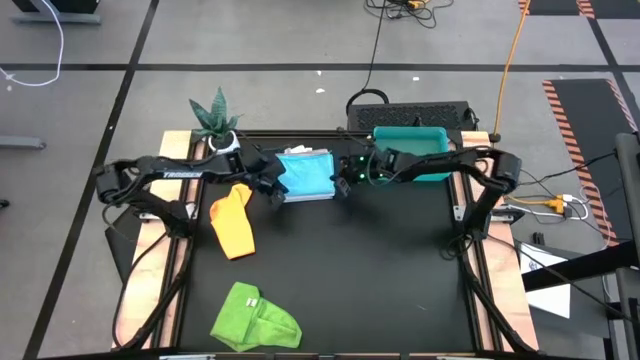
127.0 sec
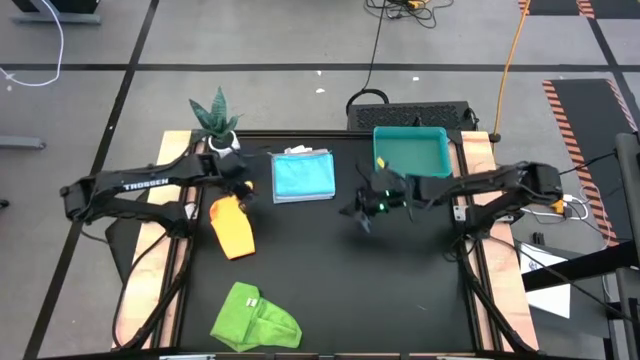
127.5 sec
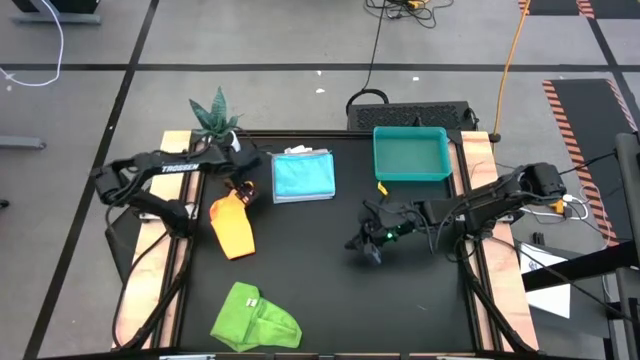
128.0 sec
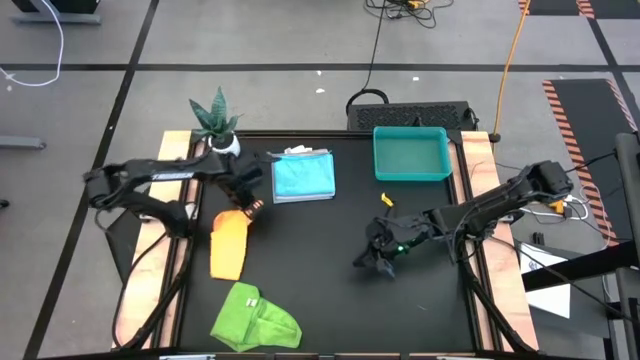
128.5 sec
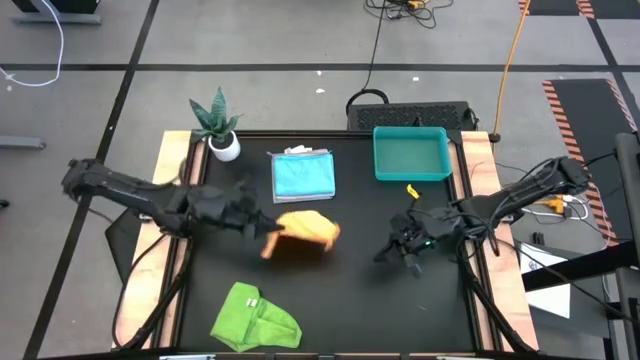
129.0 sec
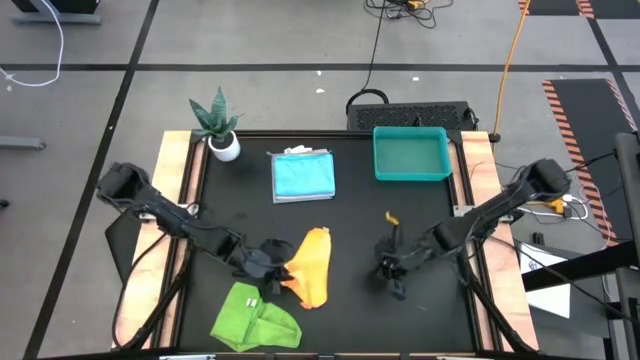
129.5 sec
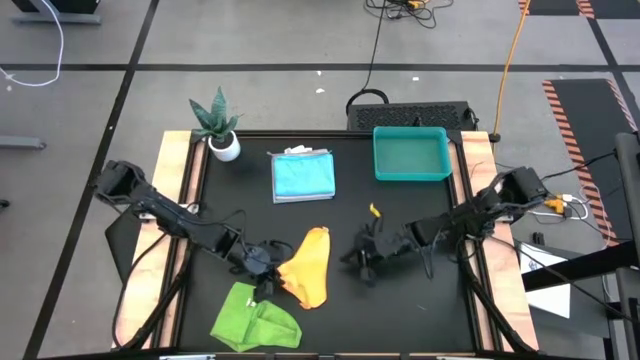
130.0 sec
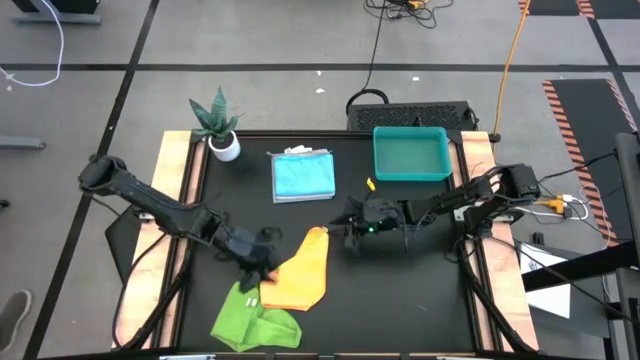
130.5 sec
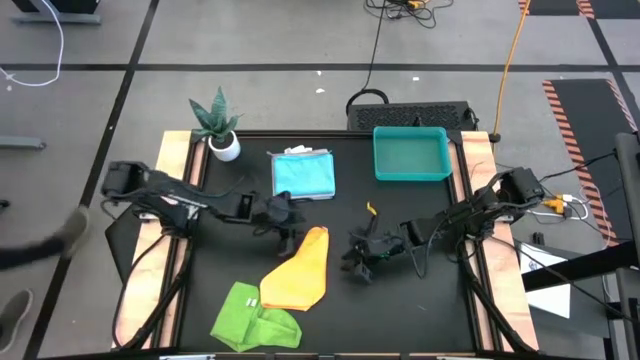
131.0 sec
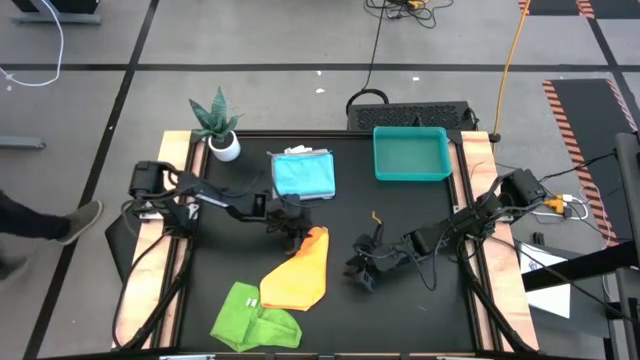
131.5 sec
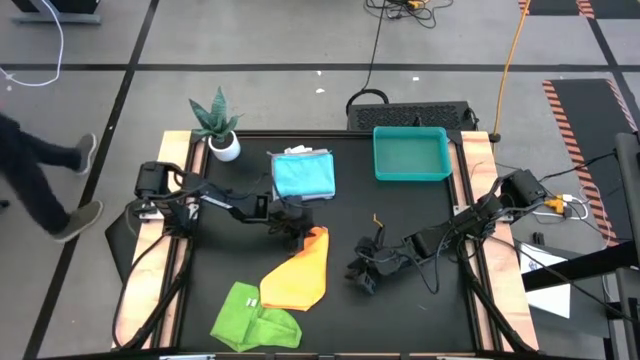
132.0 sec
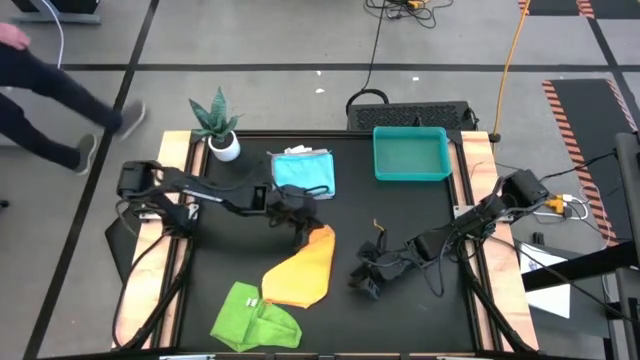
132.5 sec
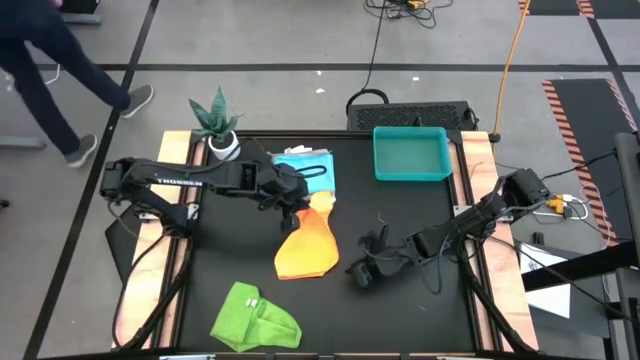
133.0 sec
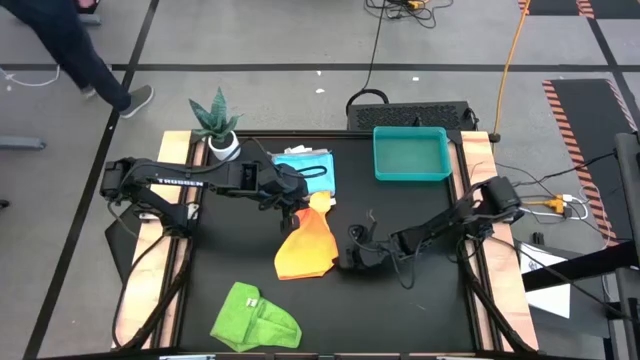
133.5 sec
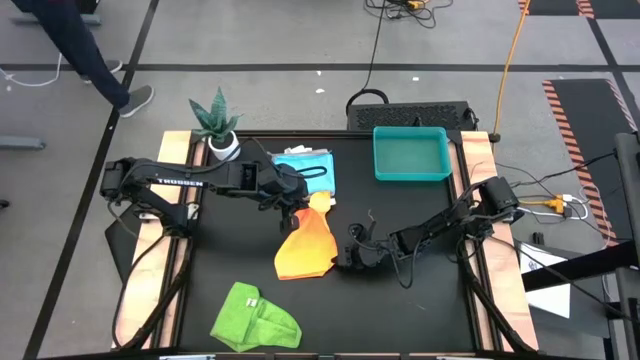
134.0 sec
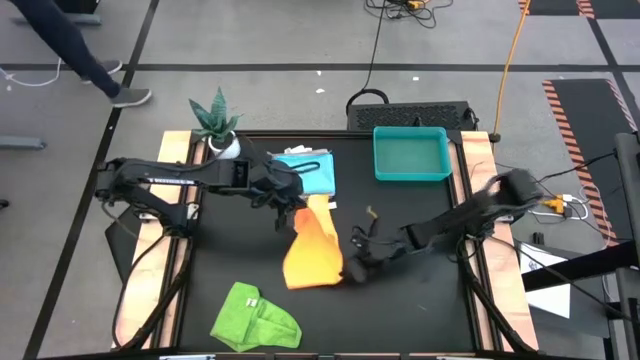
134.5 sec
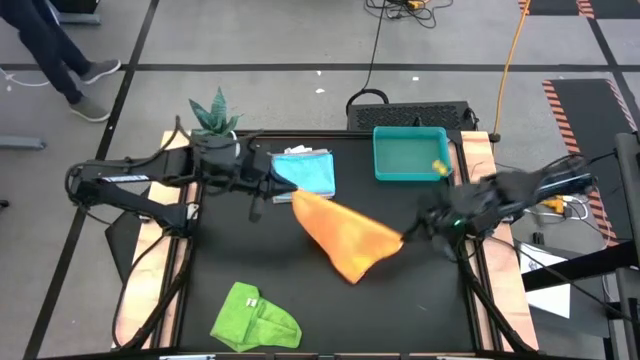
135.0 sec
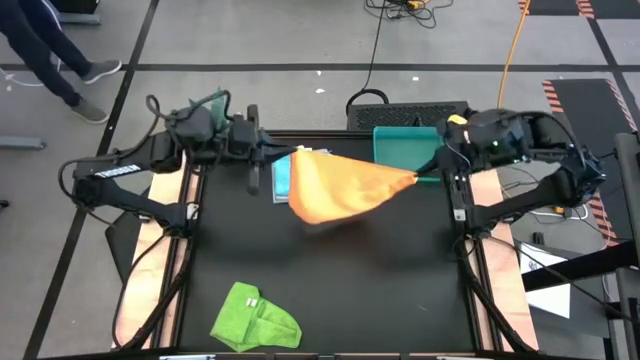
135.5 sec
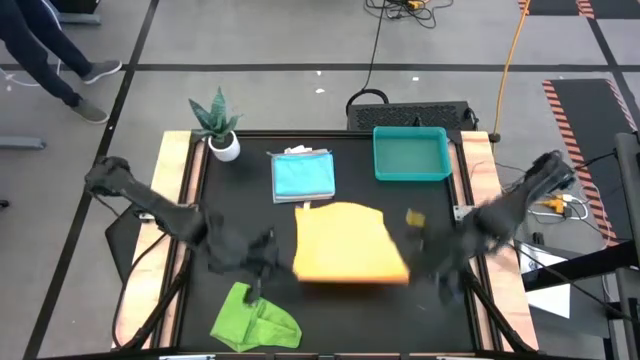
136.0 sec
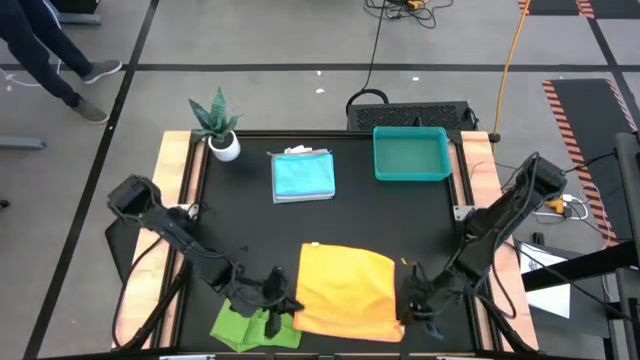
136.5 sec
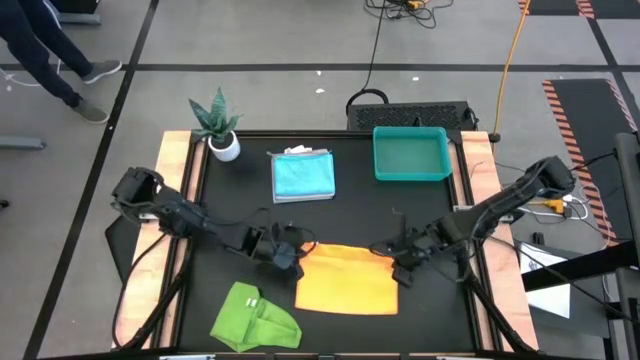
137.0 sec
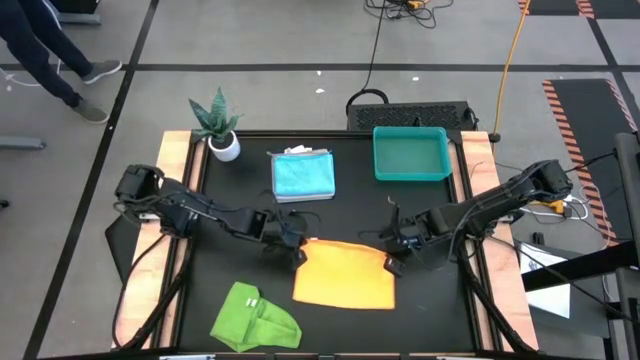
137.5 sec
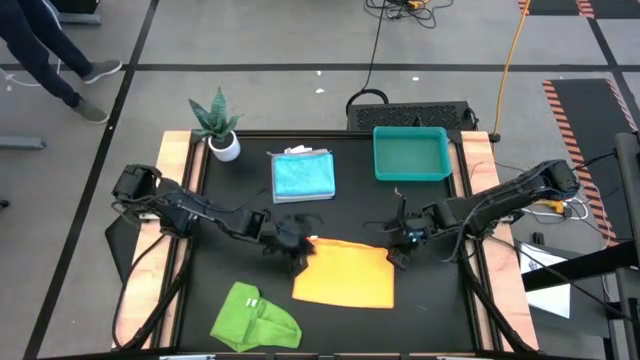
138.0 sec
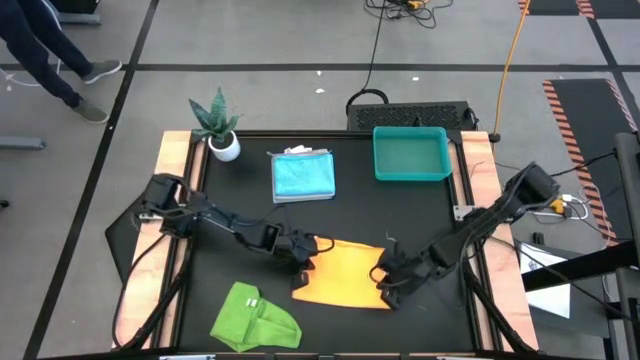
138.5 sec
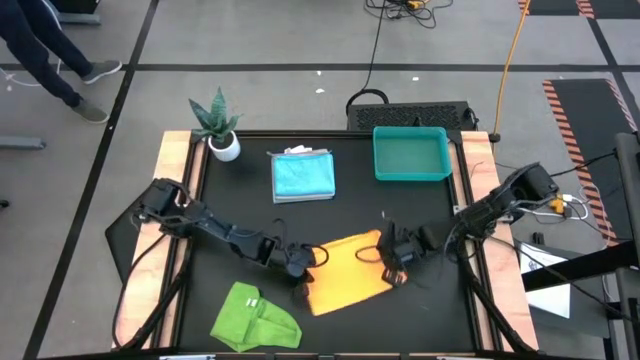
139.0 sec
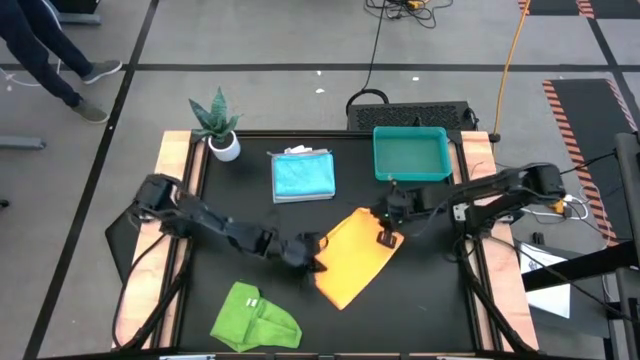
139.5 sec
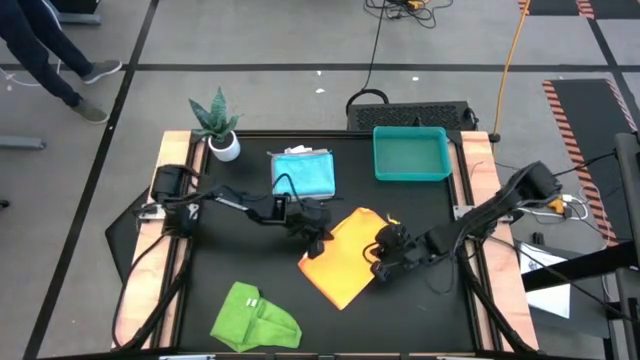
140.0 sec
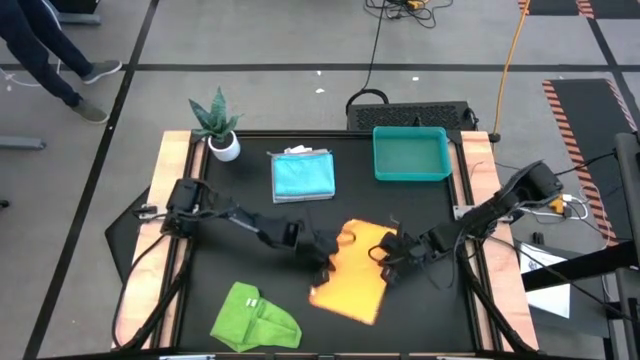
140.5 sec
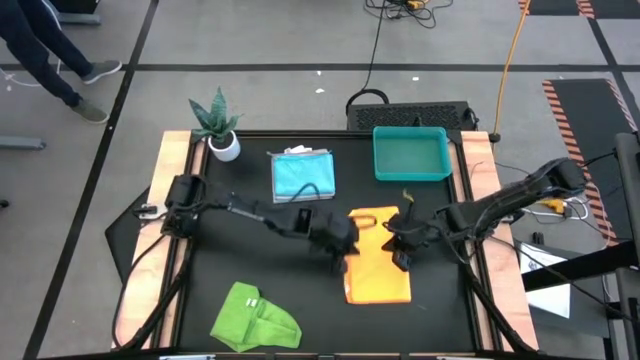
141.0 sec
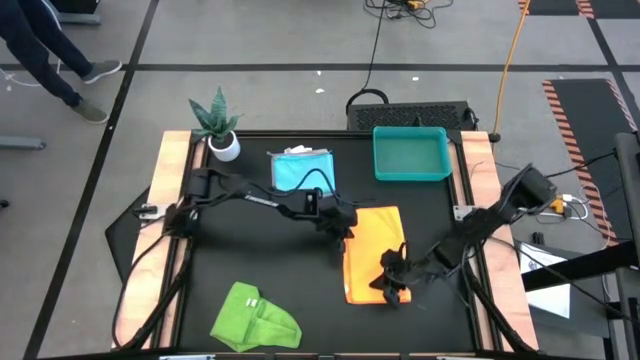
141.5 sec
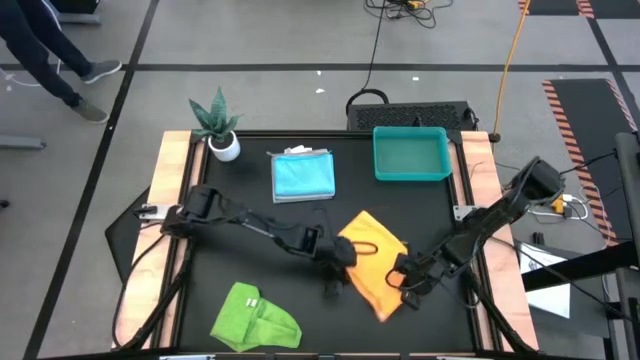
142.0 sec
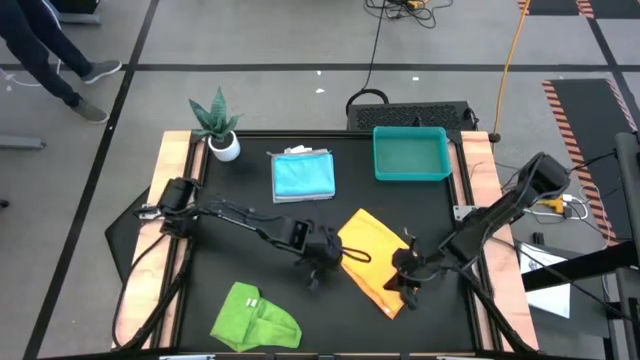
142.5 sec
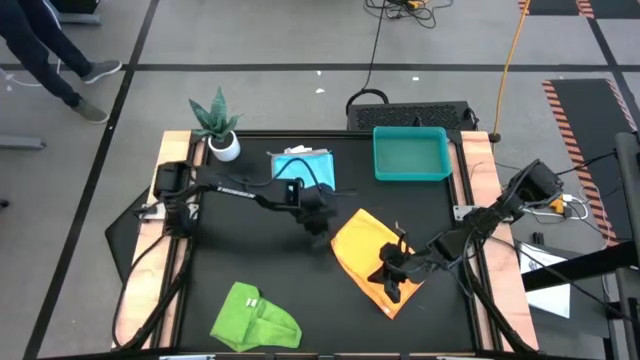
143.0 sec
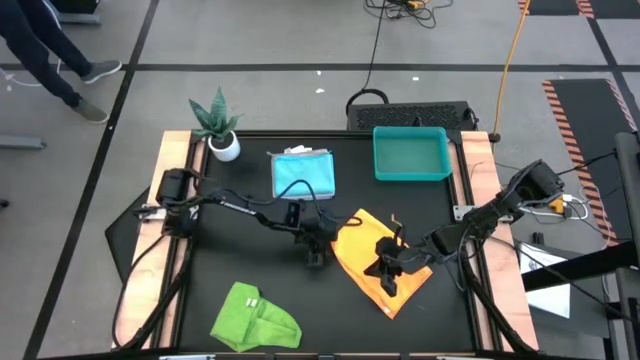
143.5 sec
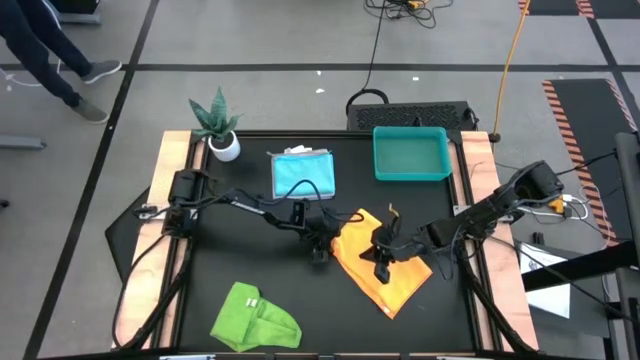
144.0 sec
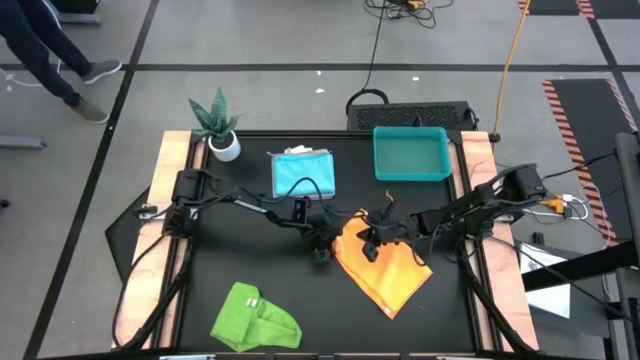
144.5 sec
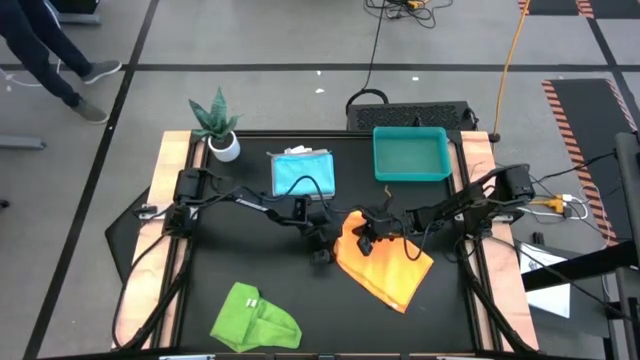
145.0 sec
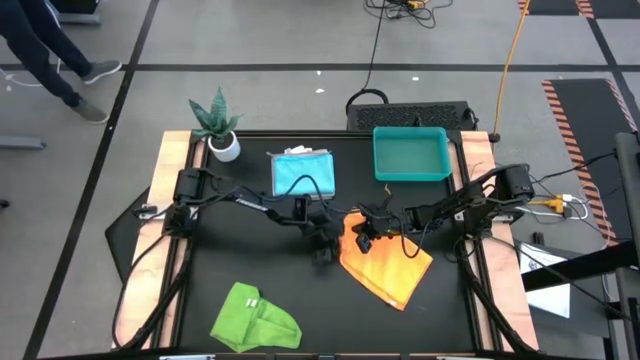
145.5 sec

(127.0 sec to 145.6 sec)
Task: Fold microfiber towels
Fold the yellow microfiber towel

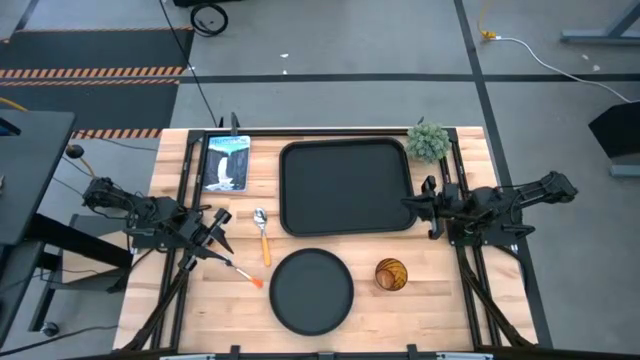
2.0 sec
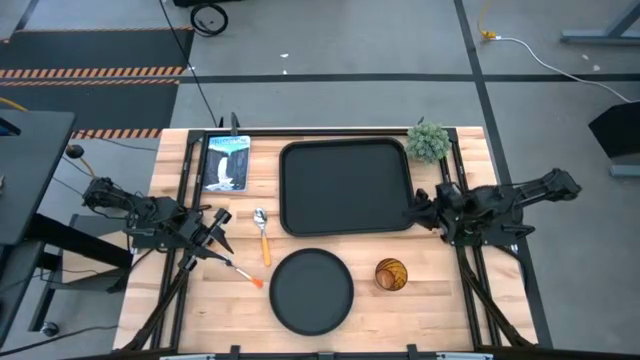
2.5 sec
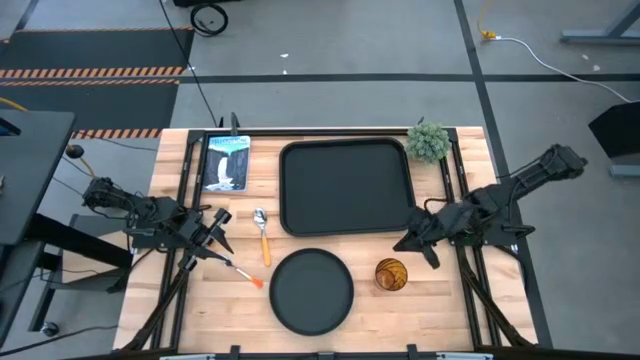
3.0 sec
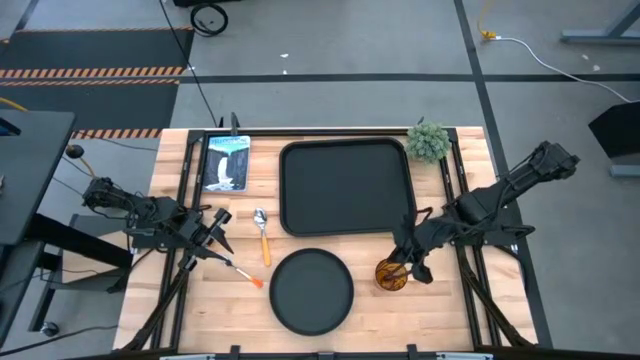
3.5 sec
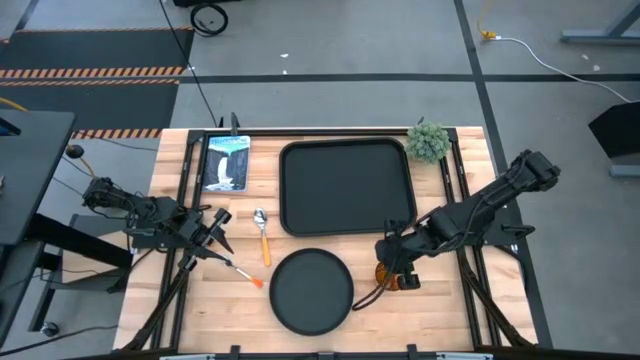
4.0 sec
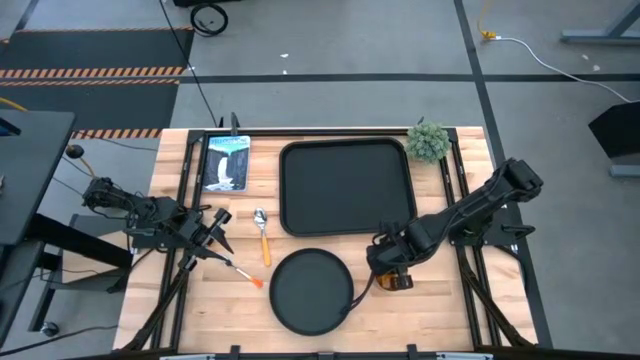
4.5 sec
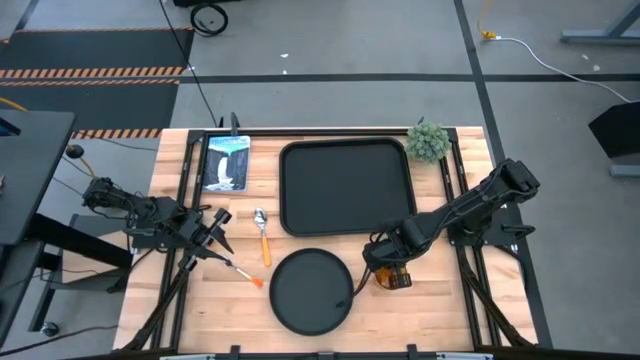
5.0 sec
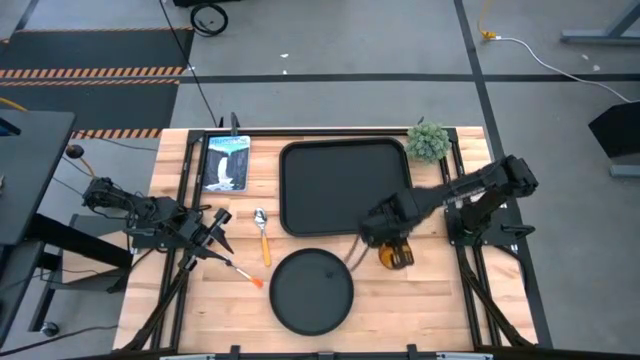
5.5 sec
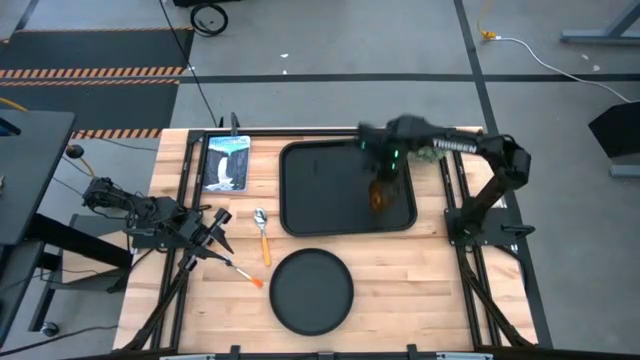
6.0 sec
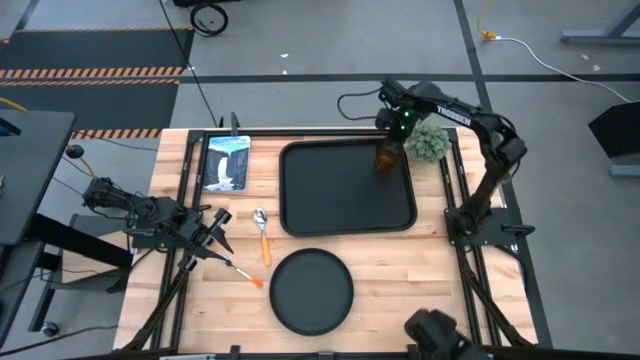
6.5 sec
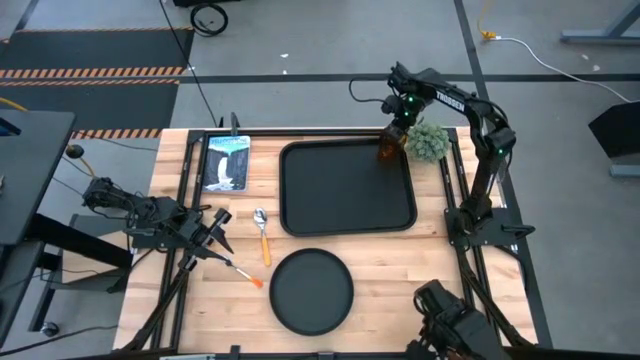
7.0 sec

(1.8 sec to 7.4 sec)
Task: Pick and place plate/cup/fork/spoon on tray
Put the yellow cup on the top right of the black tray
